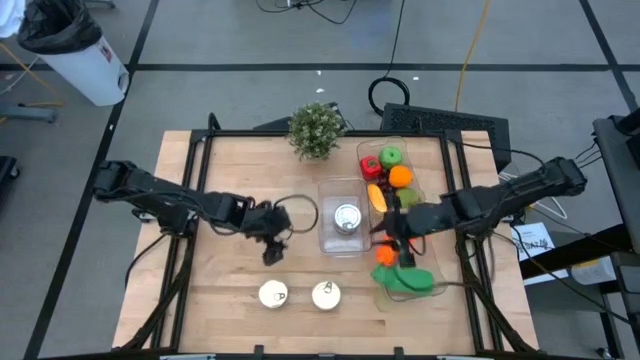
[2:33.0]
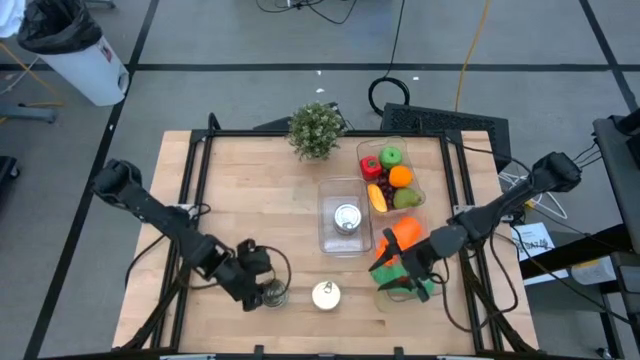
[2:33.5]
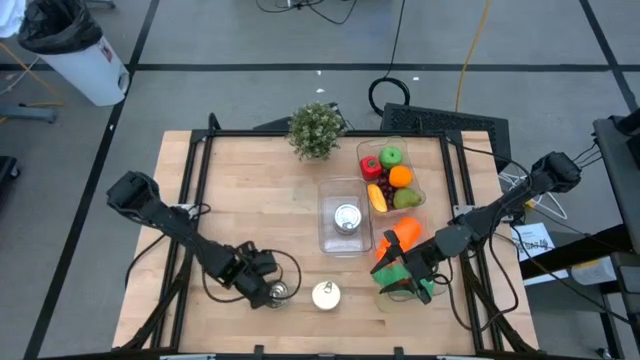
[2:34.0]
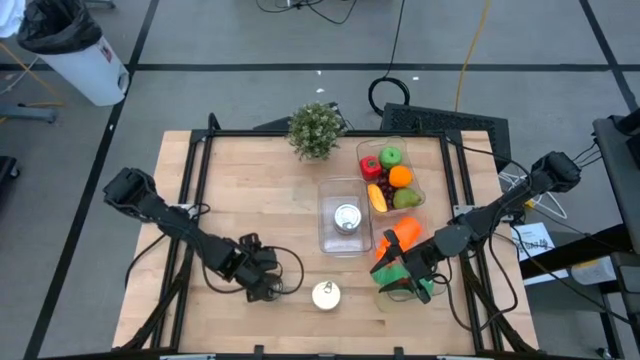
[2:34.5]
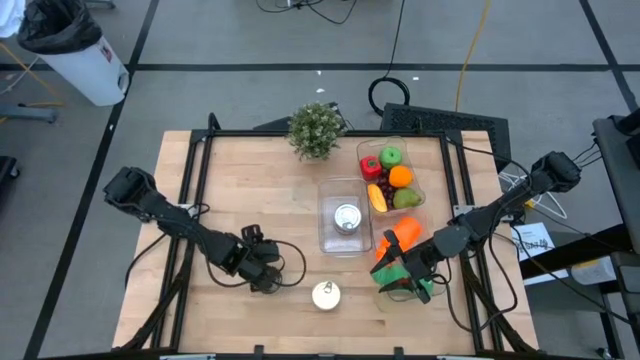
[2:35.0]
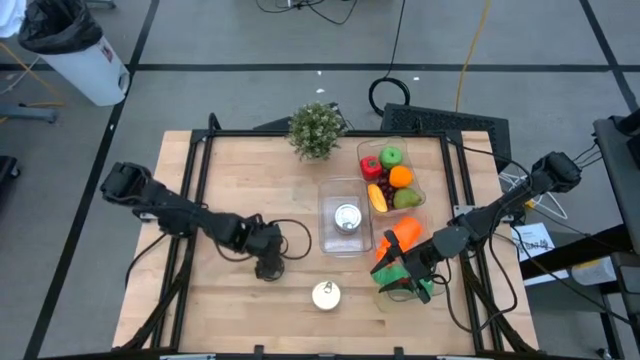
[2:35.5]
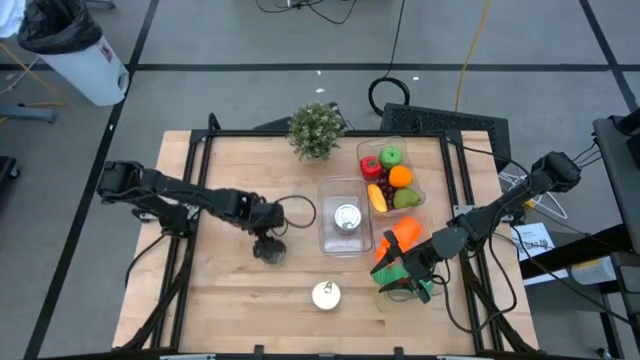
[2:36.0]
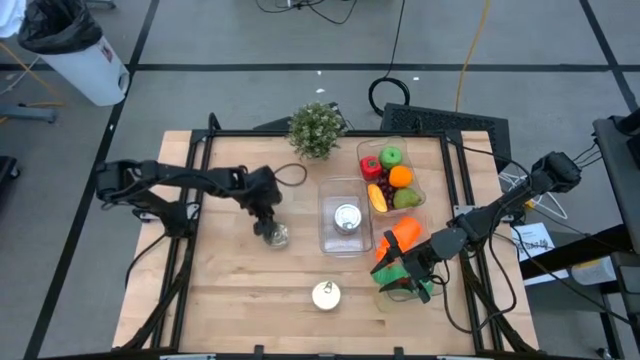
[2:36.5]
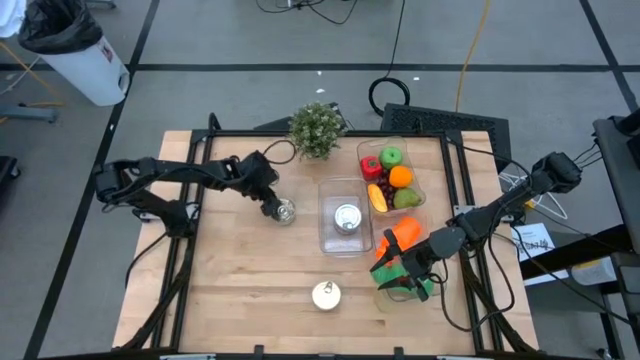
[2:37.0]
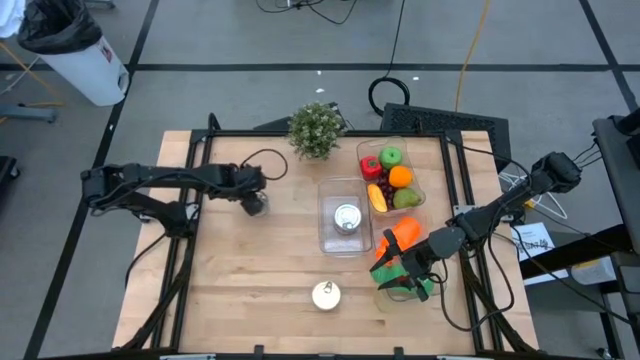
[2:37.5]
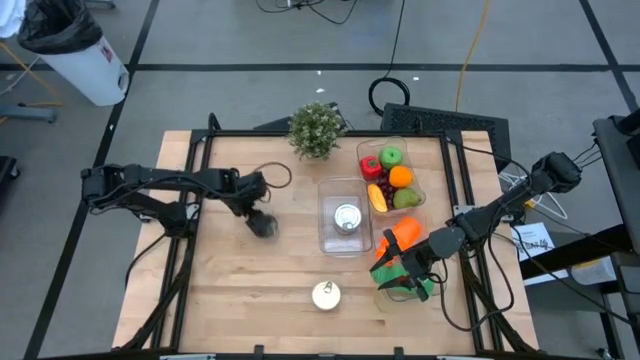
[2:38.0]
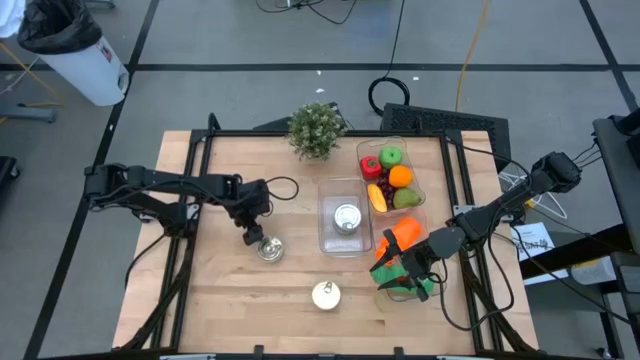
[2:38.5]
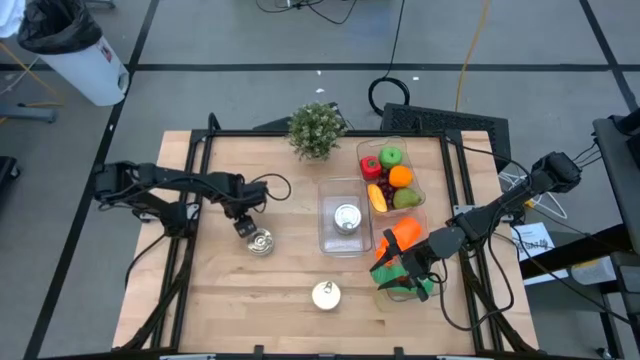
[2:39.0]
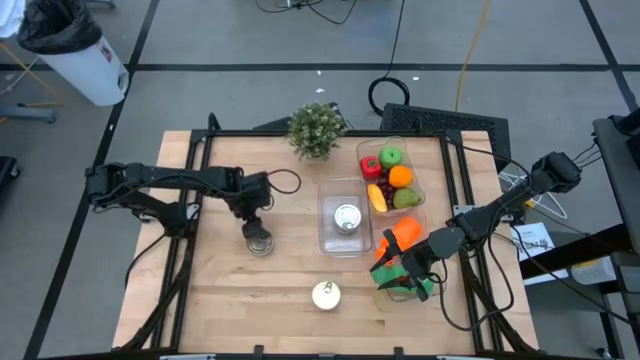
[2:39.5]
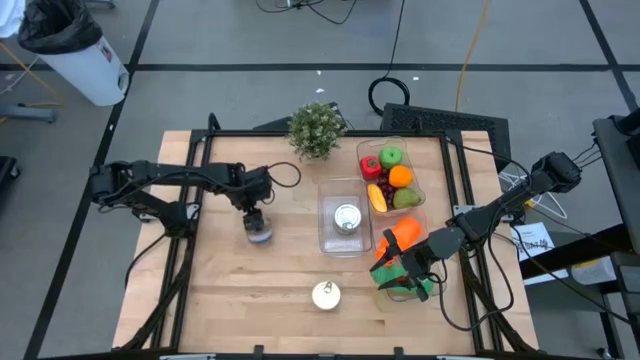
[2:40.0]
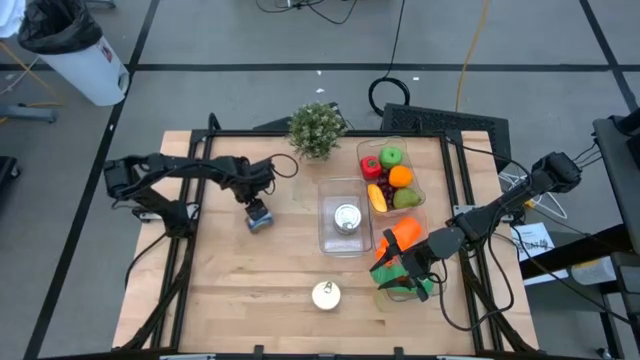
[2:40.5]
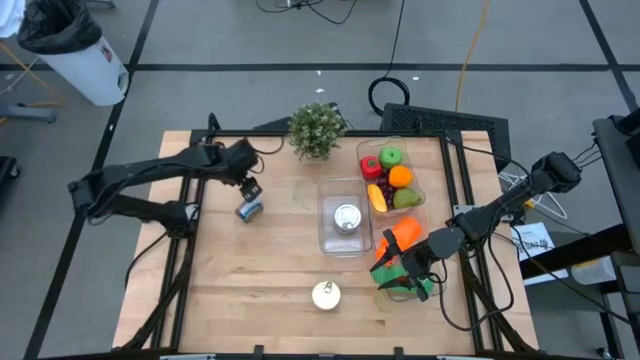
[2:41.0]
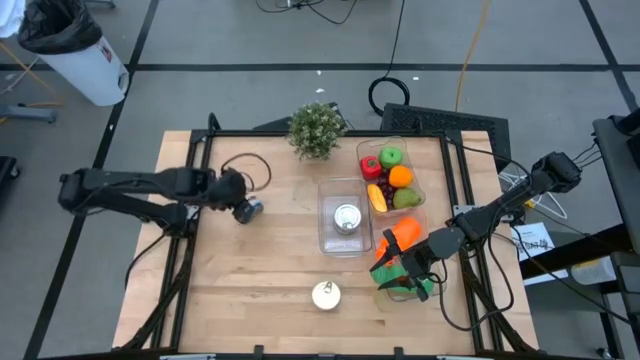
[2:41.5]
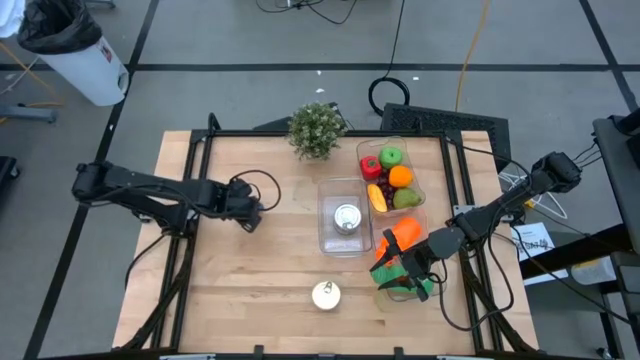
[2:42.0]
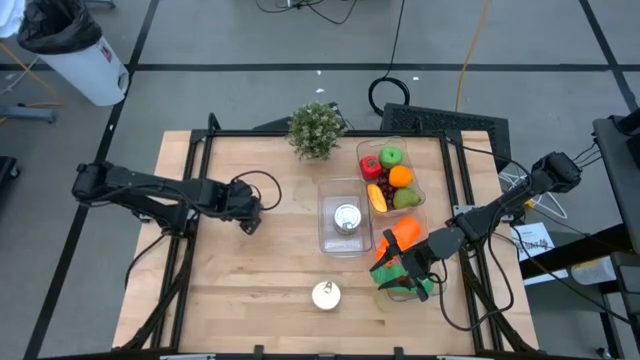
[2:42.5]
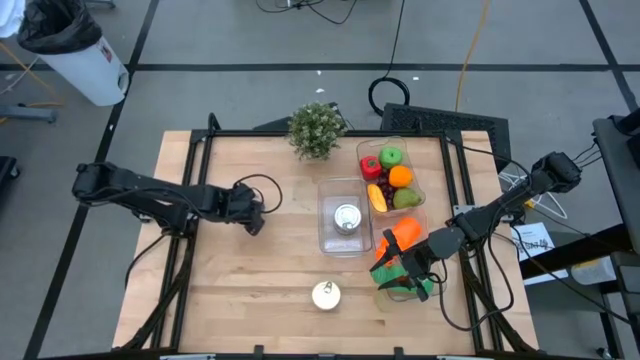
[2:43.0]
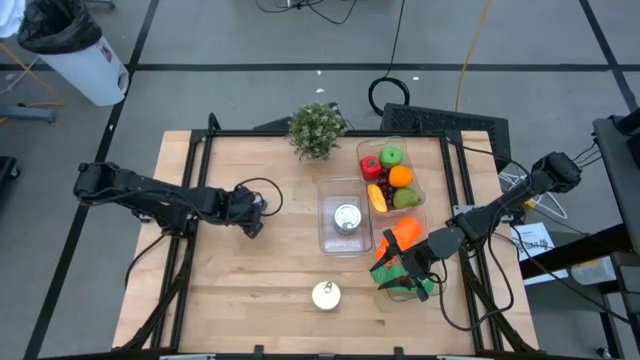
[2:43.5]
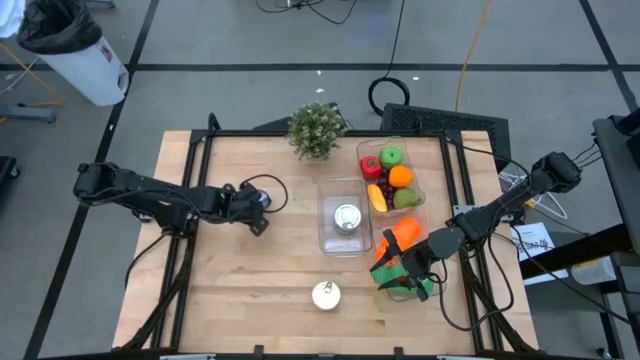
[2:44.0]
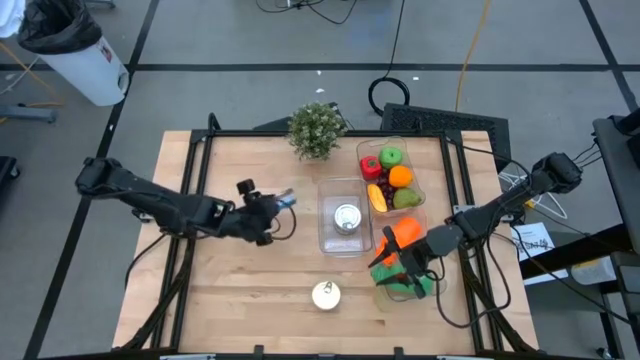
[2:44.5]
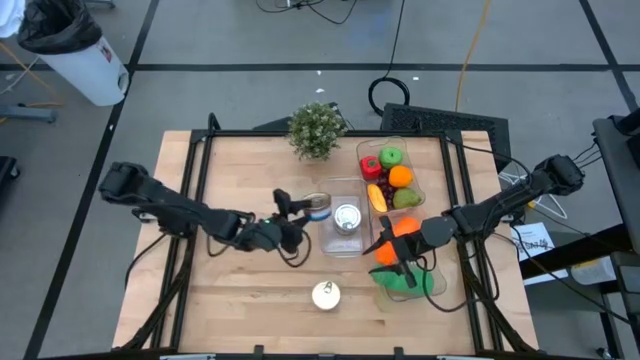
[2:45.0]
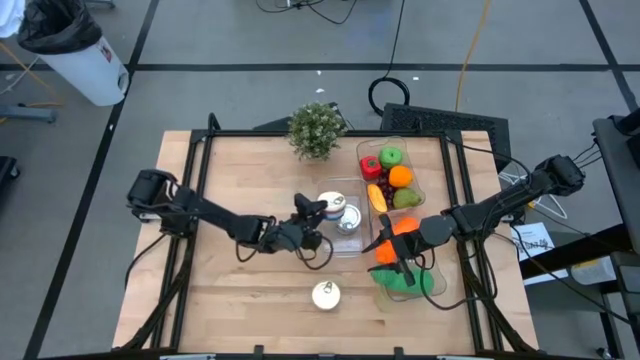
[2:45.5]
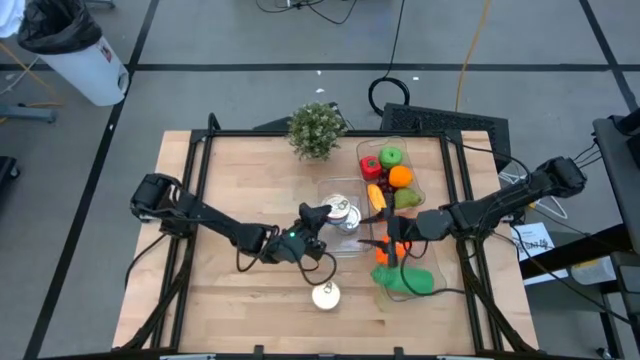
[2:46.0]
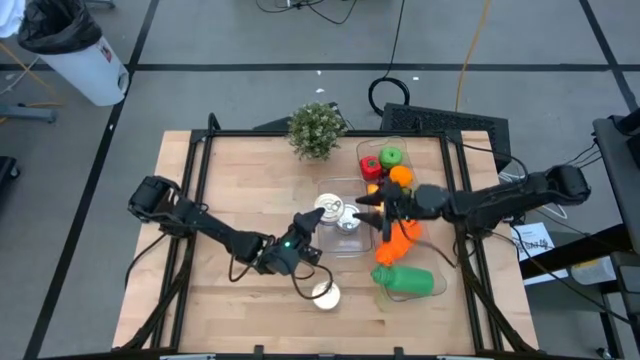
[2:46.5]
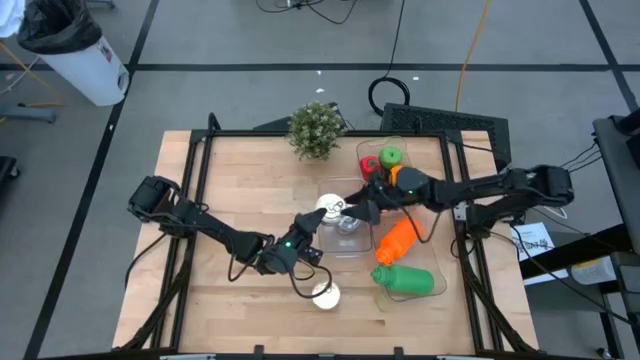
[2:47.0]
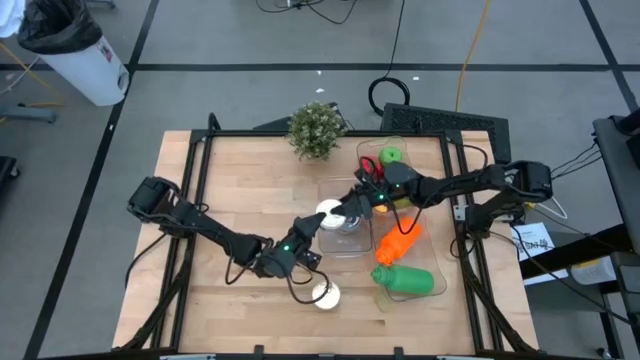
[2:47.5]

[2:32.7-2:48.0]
Task: Pick & Place Food Item
Put the left blue tuna can into the middle transparent bin

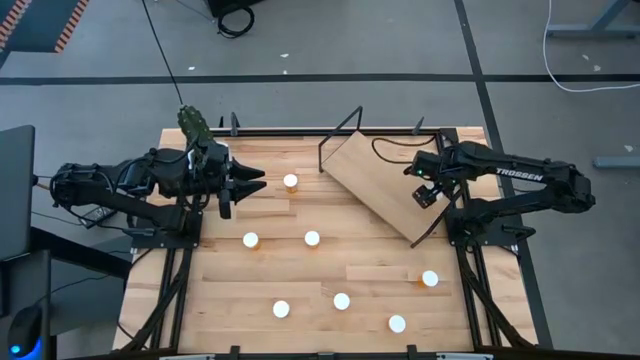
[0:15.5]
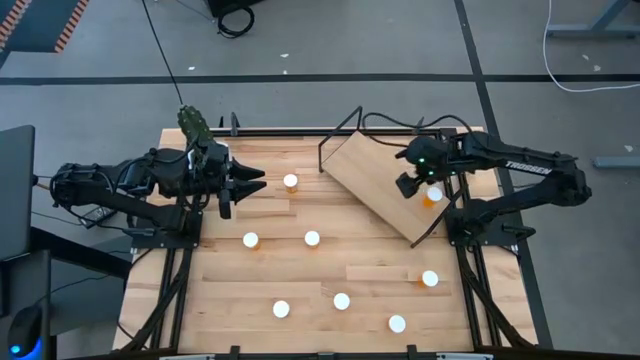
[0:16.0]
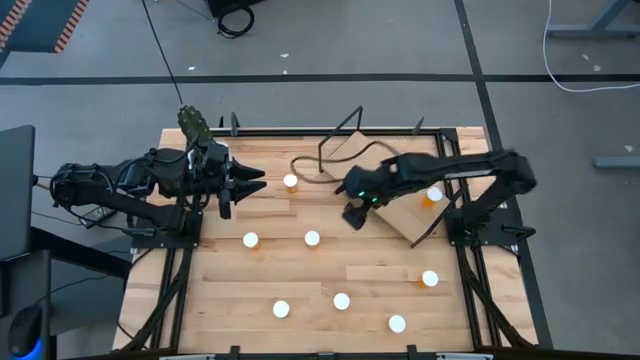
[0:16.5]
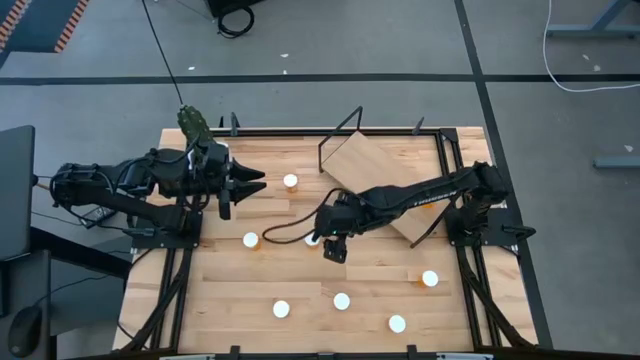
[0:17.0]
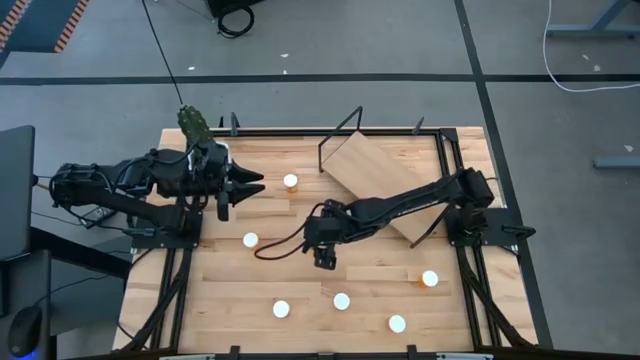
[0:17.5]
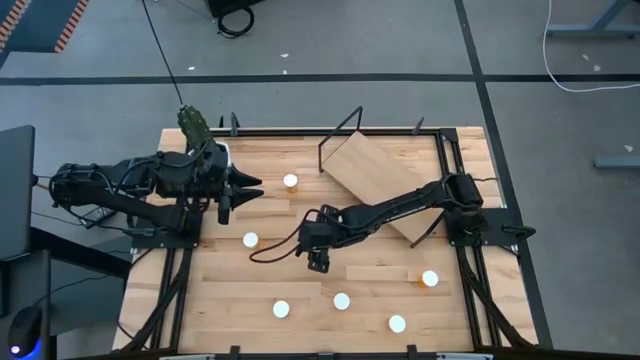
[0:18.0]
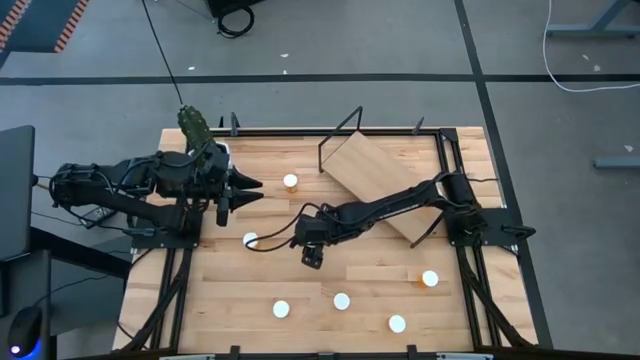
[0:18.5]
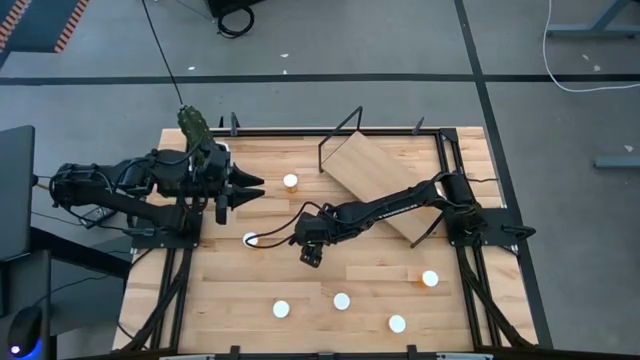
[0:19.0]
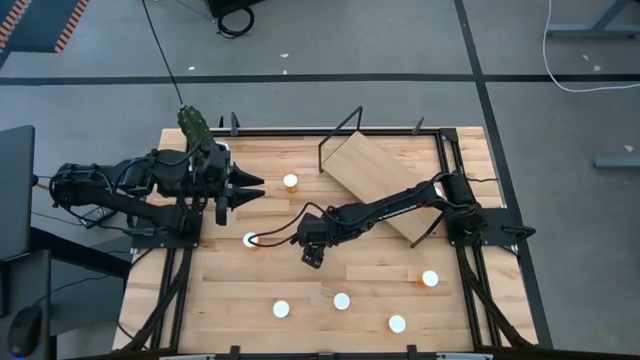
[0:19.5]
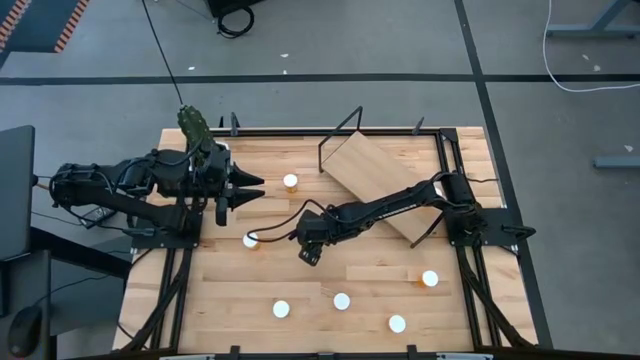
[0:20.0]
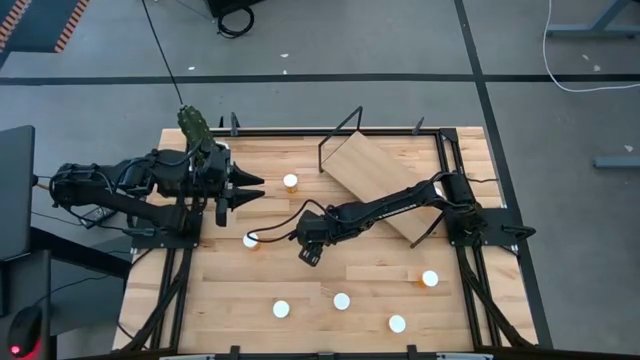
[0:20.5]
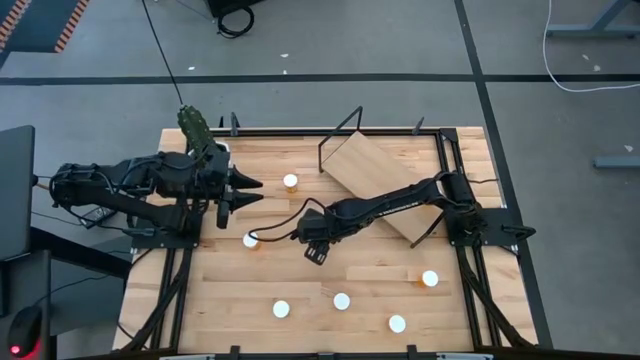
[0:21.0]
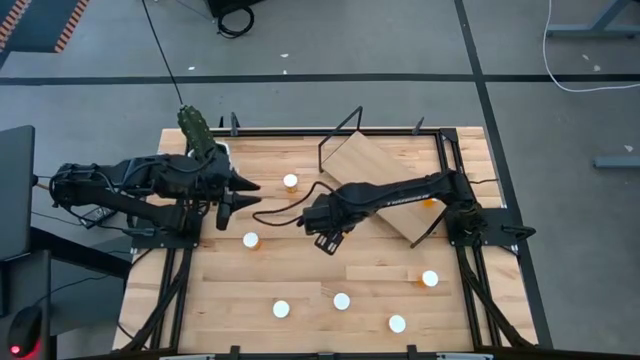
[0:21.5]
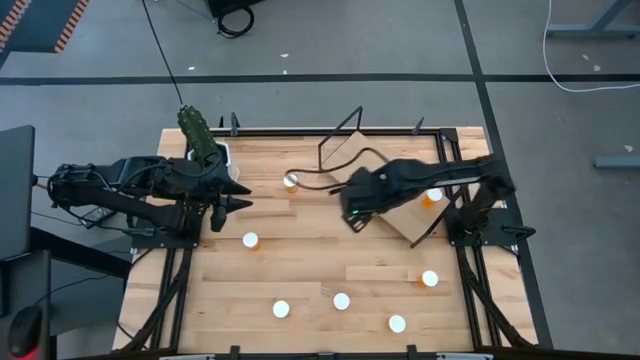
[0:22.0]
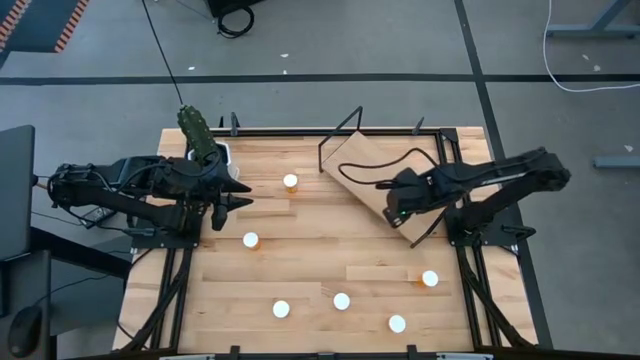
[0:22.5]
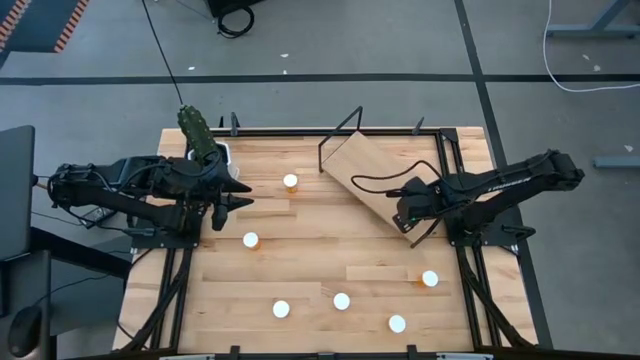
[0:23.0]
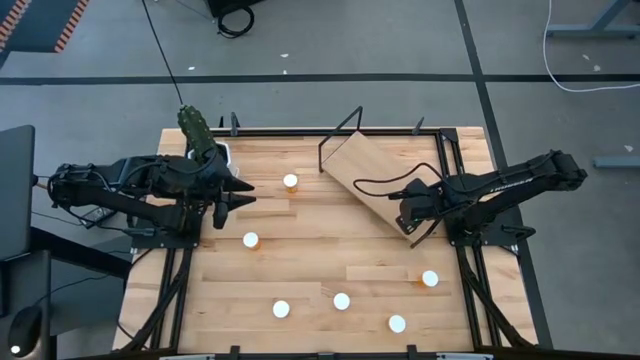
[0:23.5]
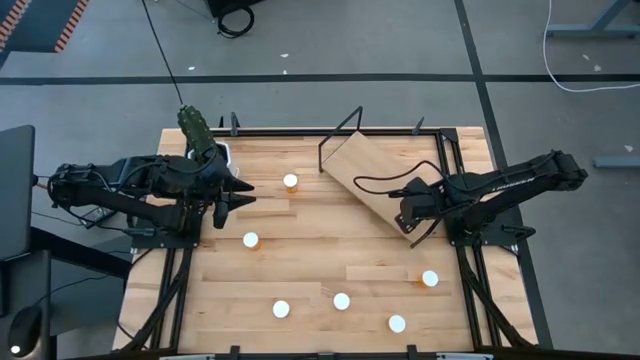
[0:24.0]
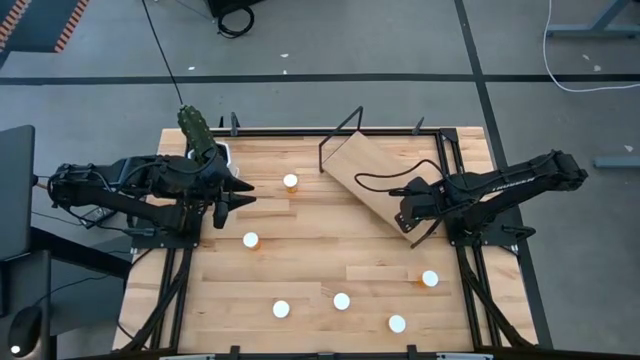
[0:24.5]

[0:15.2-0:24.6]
Task: Pick and place medicine bottles onto shelf by color
Put the orange pill bottle on the shelf aligned with the right orange pill bottle
